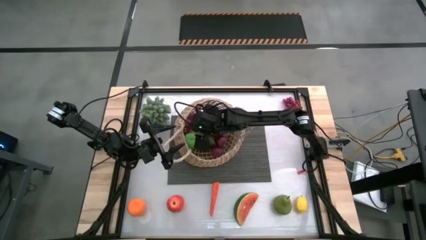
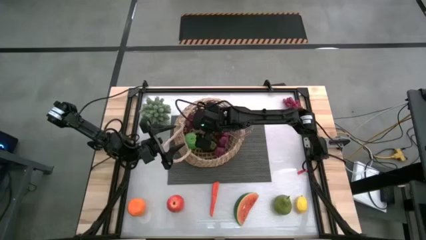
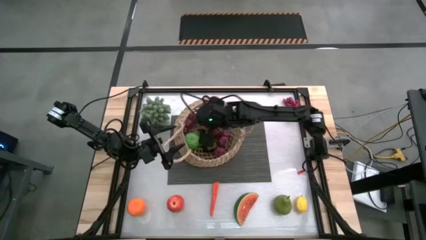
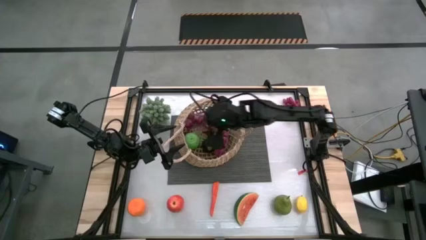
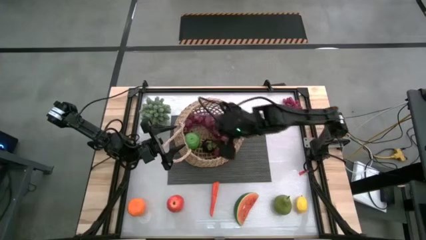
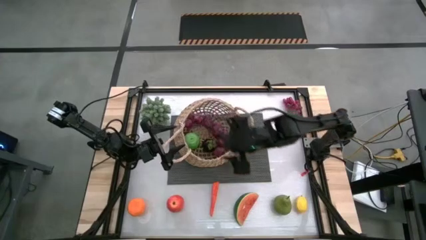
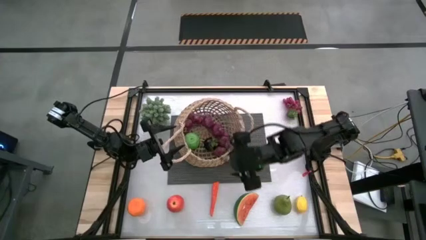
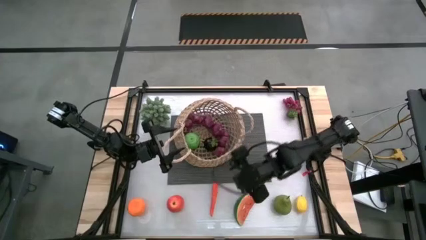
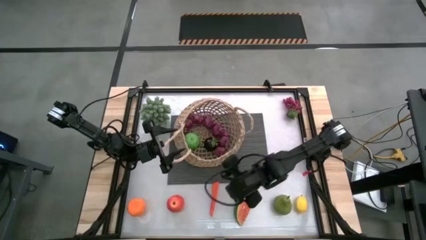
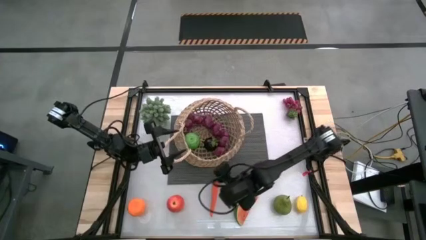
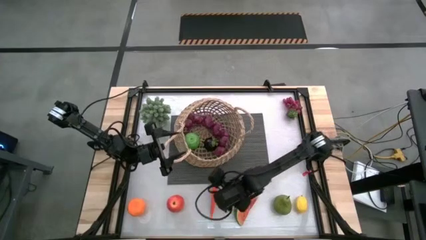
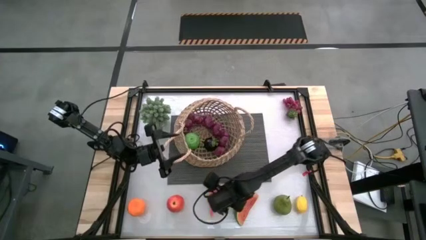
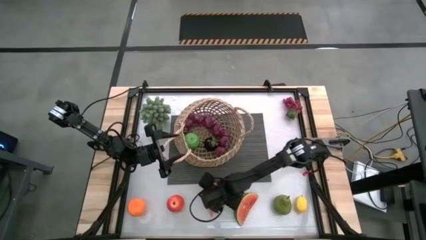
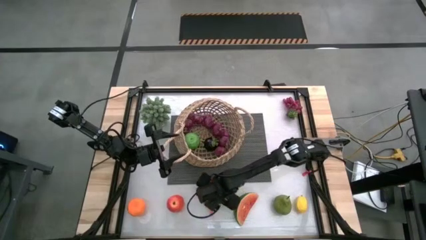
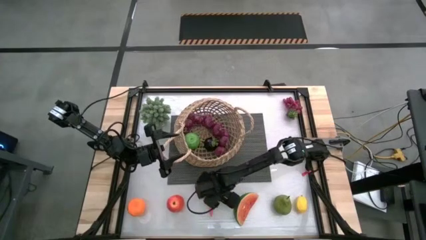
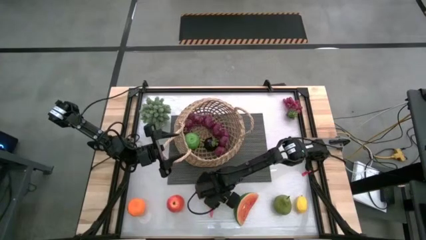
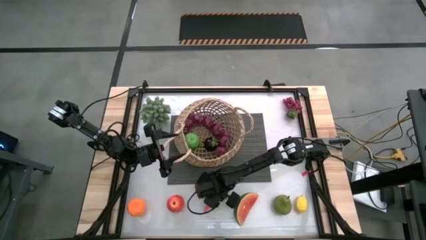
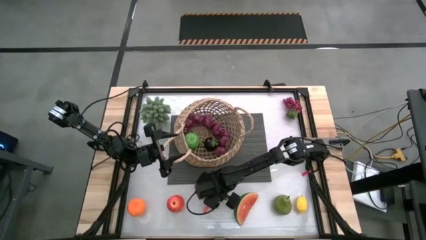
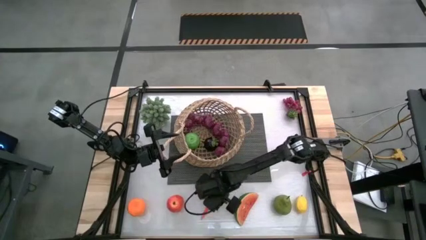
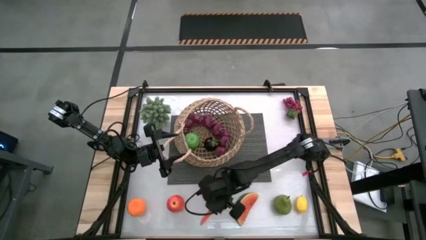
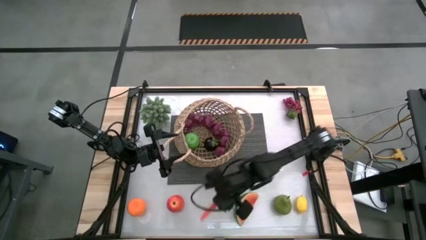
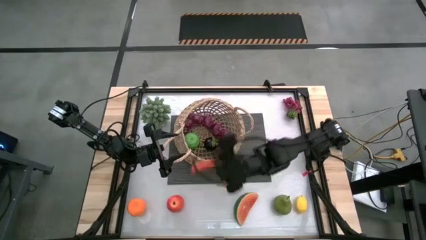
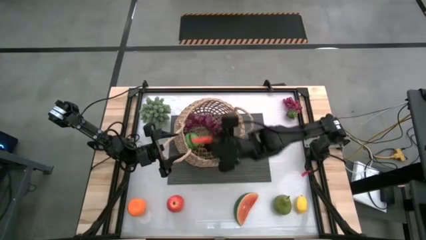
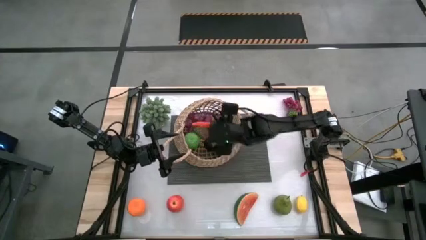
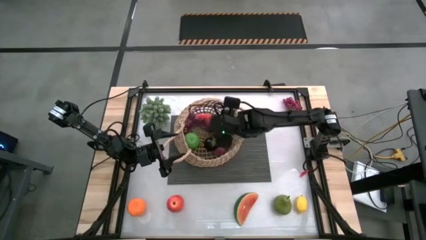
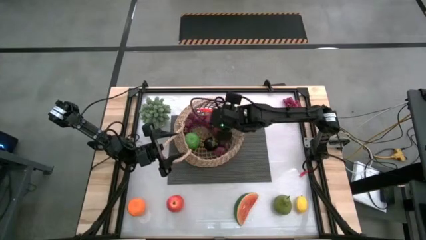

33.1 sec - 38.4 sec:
Task: Build produce basket
Put the orange carrot into the brown basket

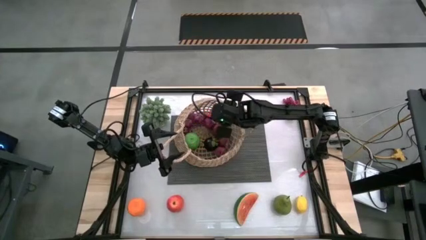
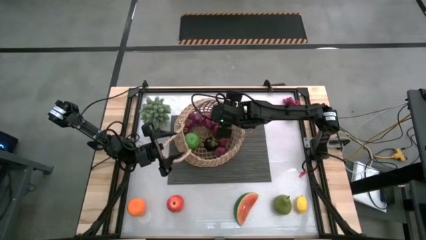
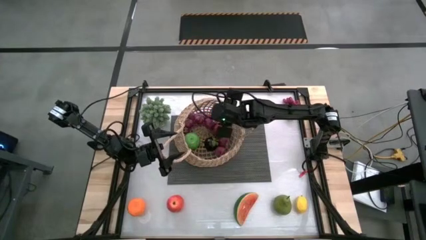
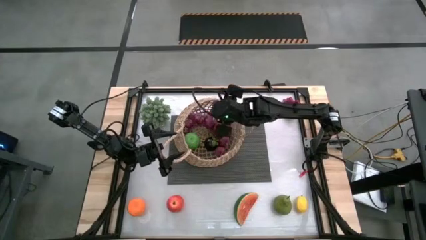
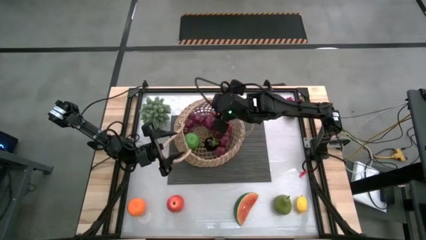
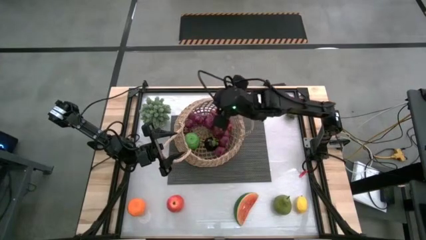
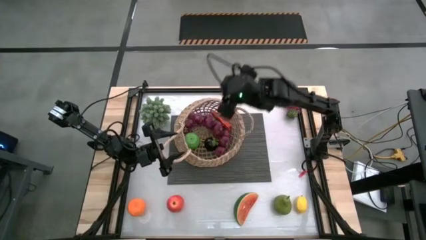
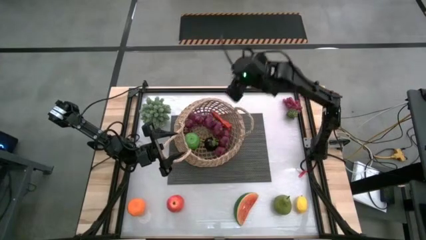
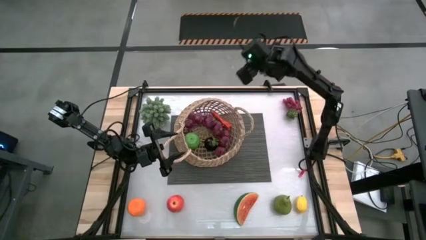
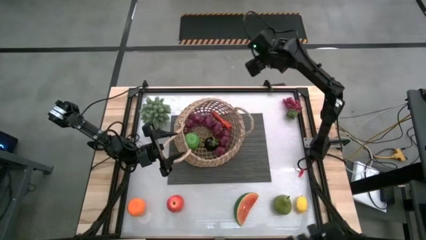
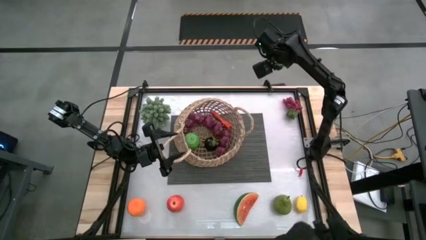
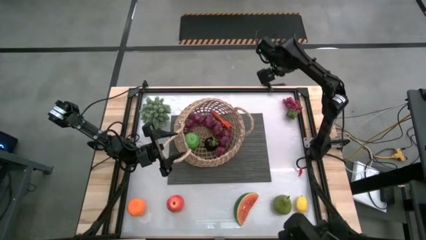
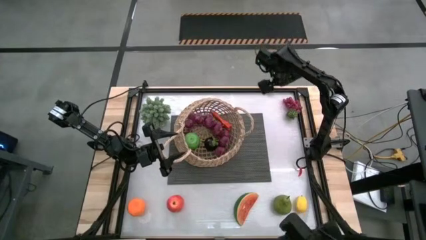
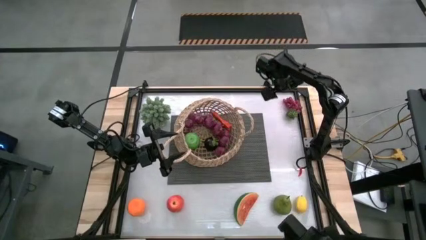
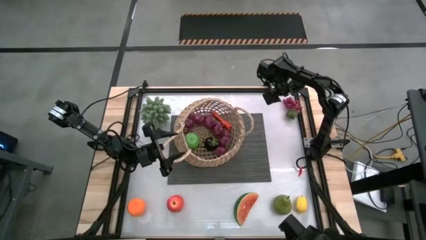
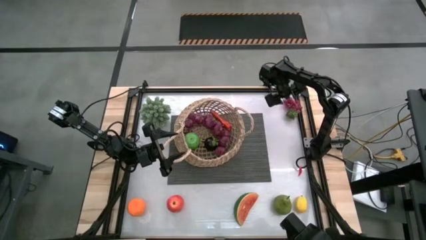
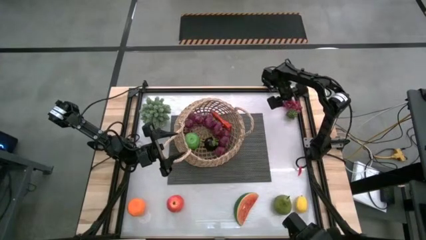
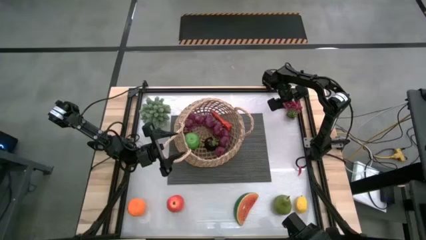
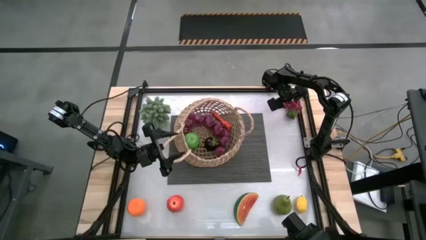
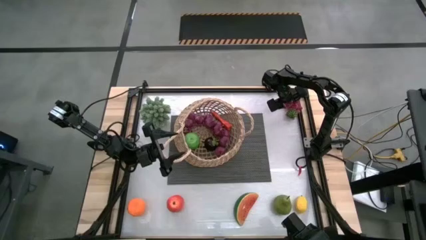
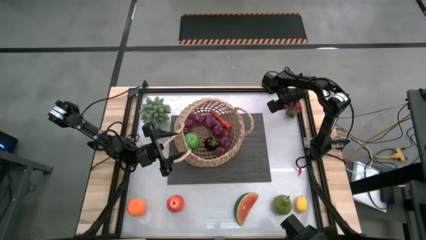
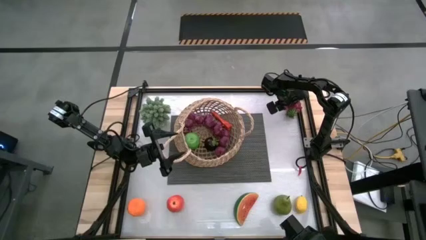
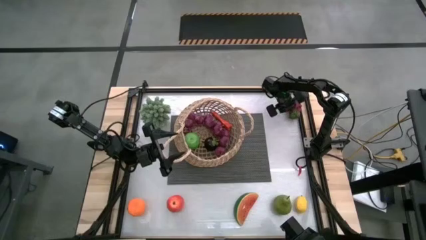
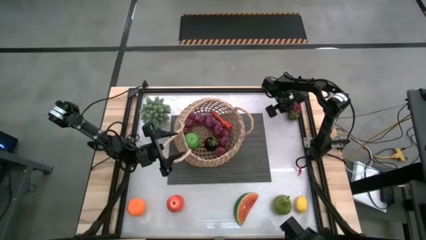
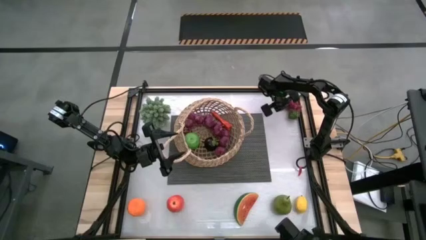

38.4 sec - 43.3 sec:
Put the purple grapes into the brown basket

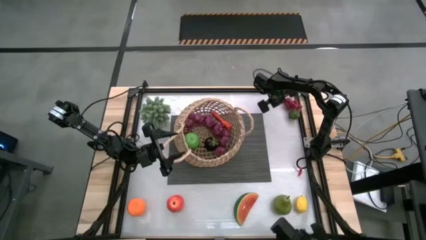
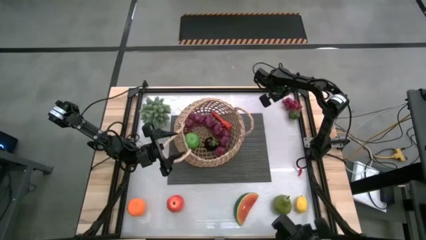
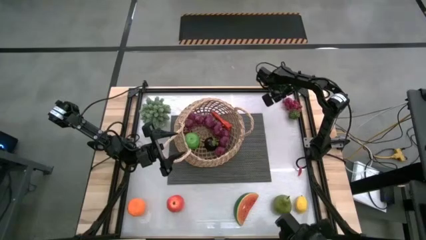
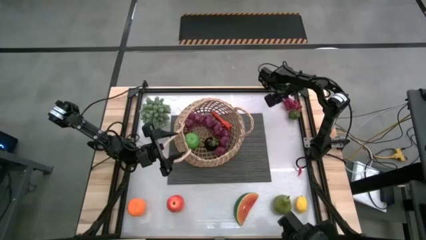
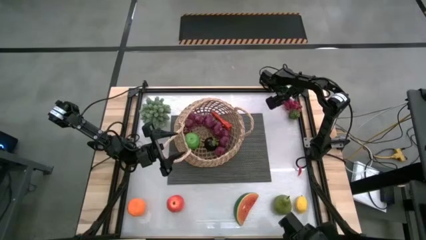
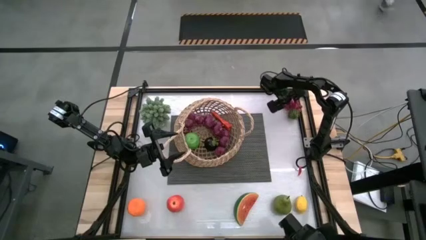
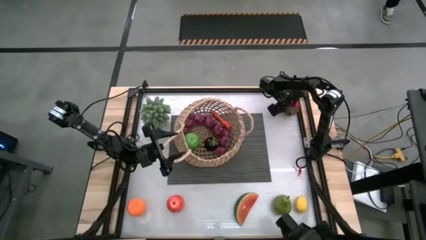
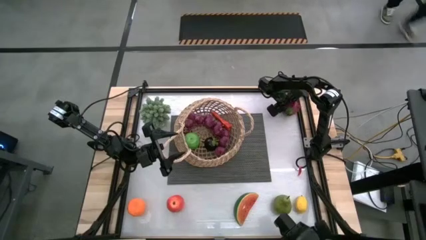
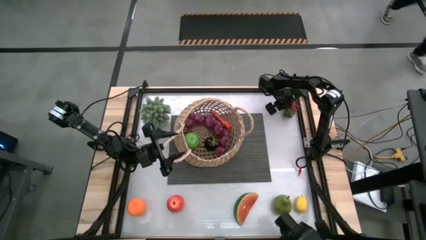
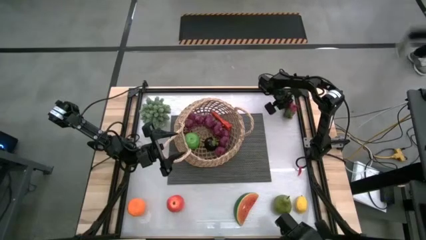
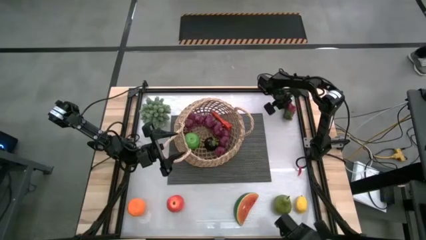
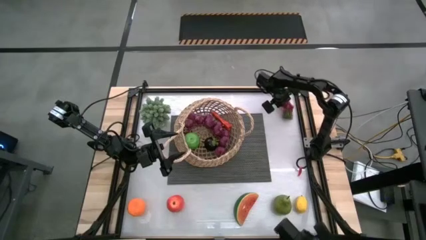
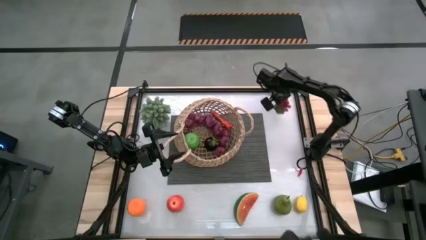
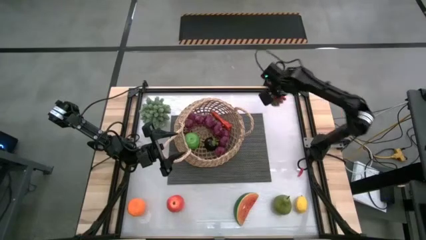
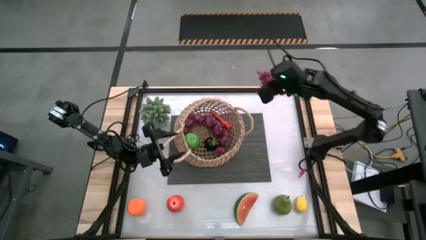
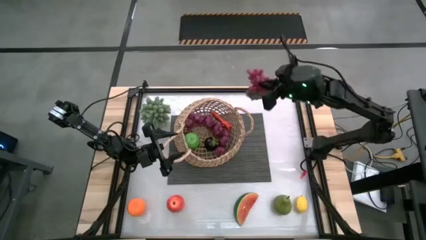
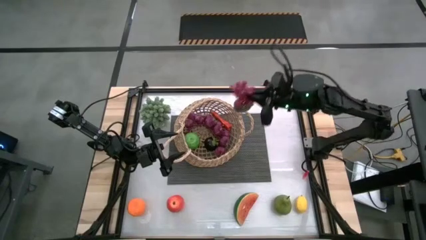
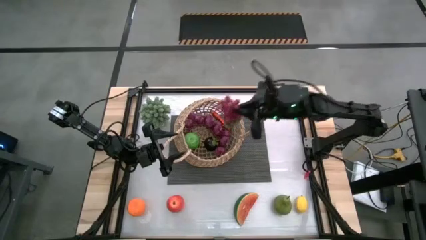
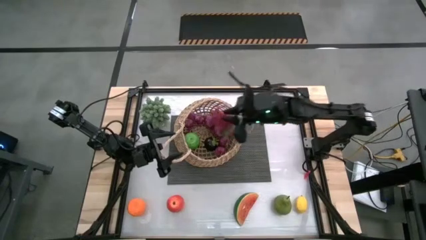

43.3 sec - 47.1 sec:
Put the purple grapes into the brown basket

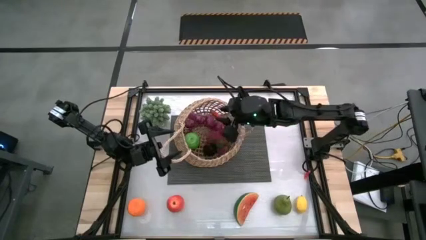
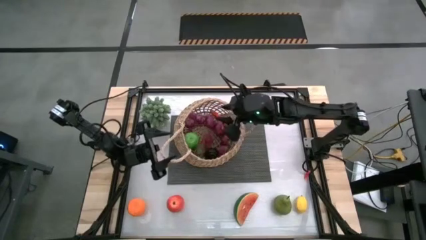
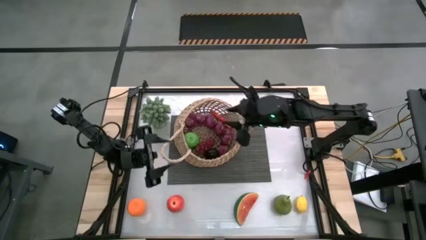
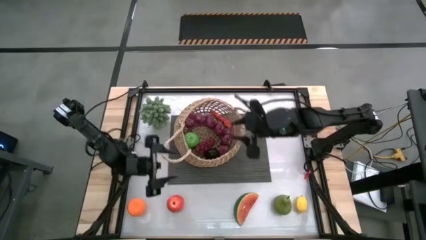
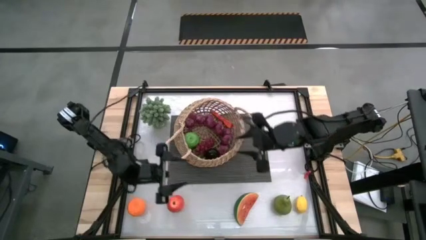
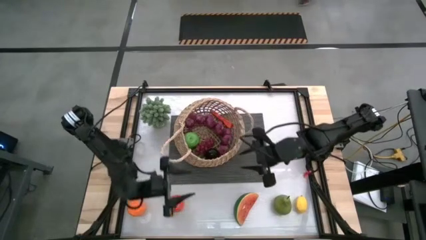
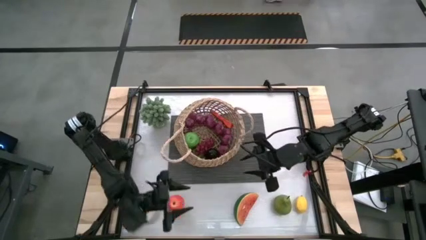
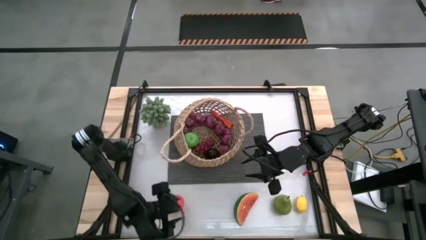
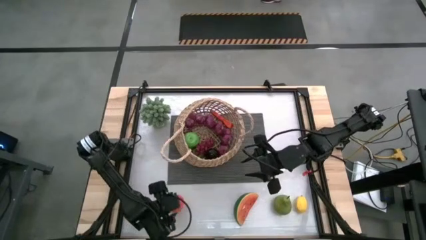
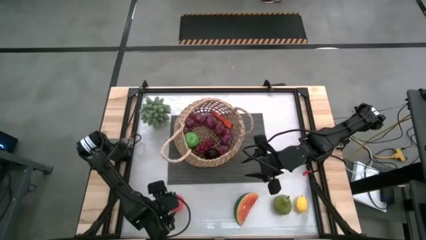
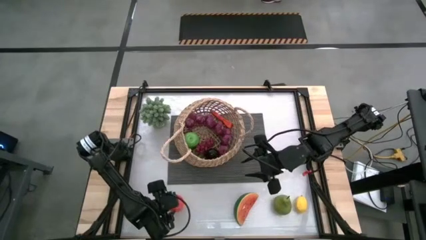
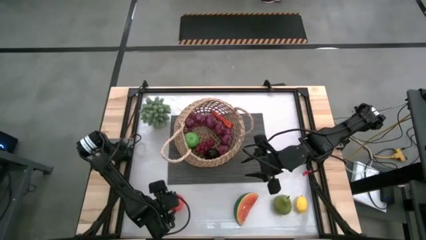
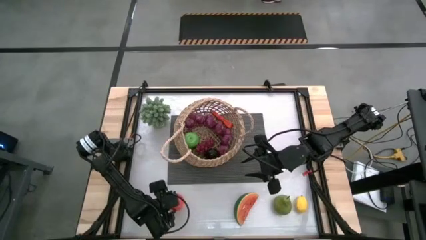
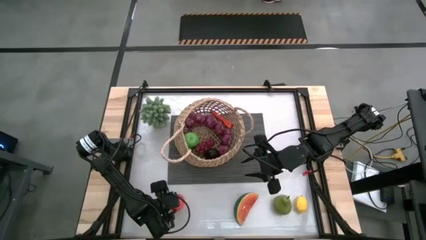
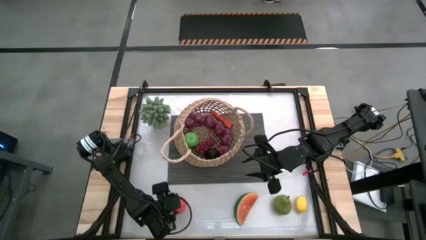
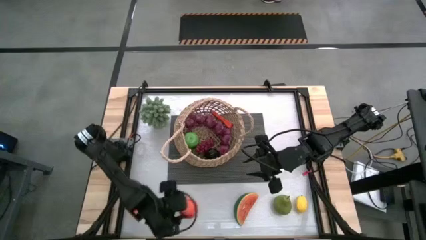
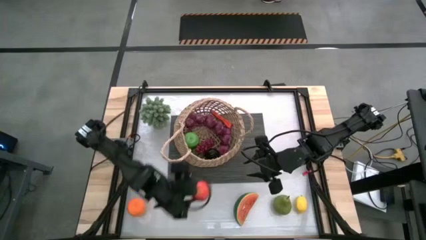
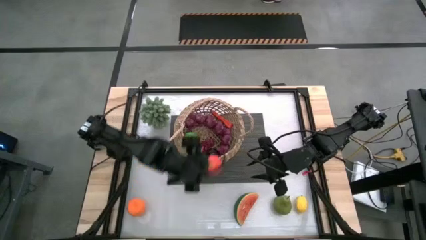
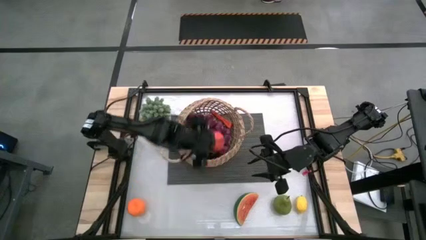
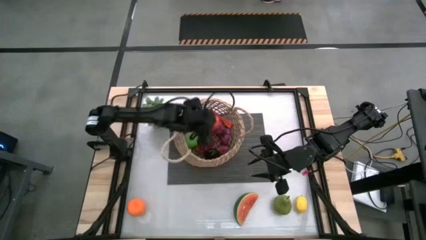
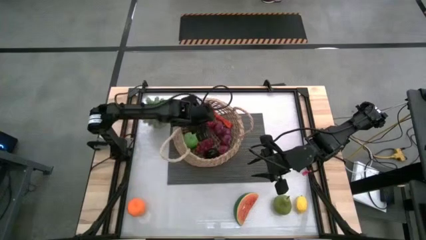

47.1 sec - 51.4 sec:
Put the red apple into the brown basket
